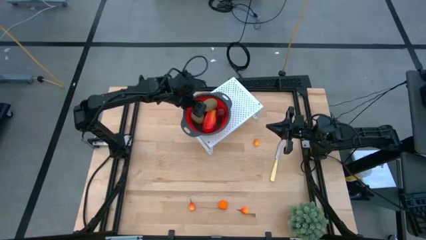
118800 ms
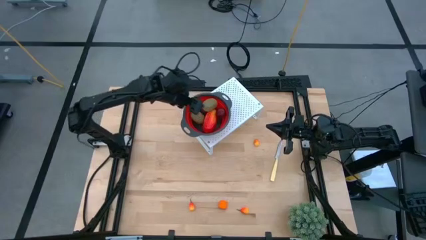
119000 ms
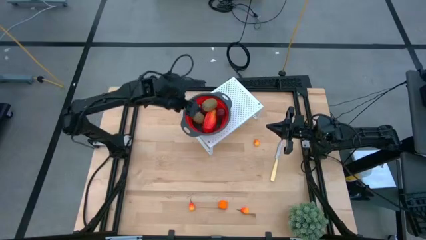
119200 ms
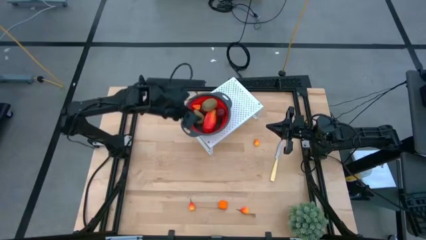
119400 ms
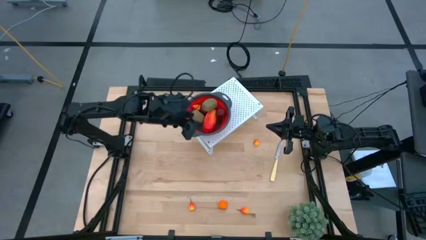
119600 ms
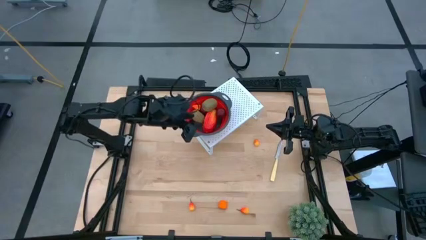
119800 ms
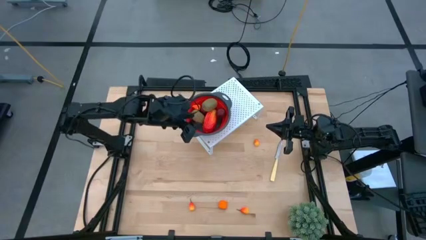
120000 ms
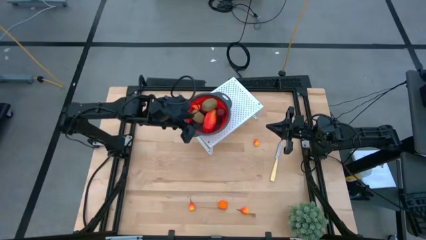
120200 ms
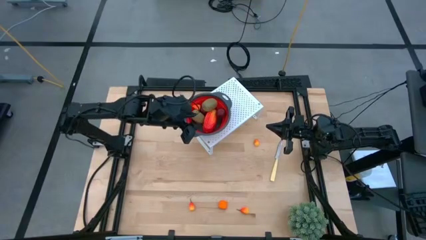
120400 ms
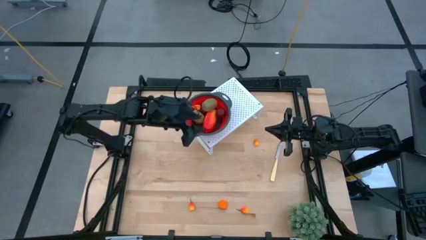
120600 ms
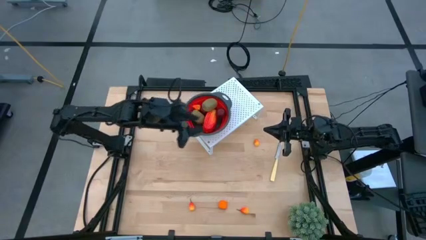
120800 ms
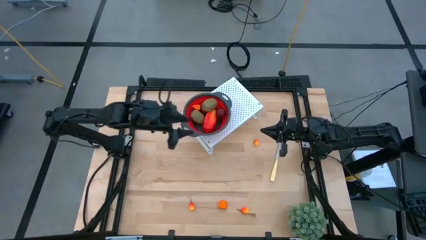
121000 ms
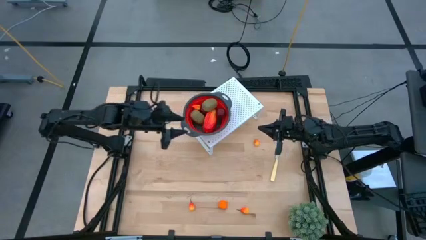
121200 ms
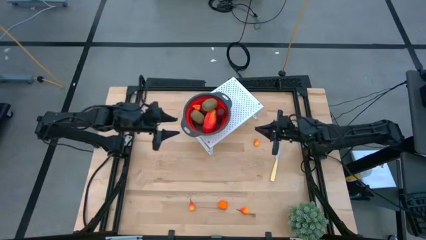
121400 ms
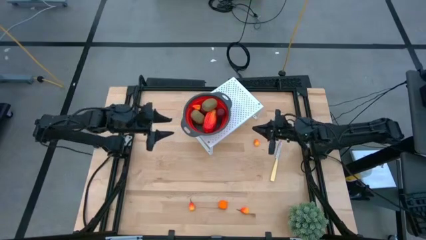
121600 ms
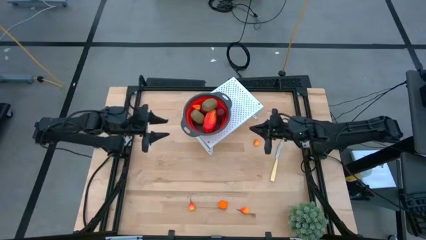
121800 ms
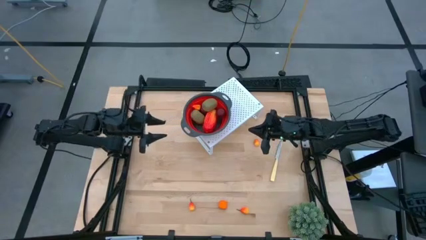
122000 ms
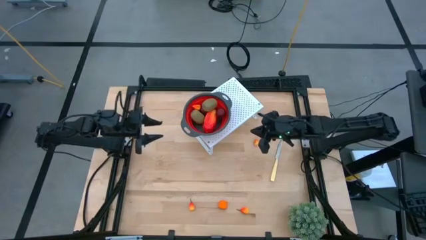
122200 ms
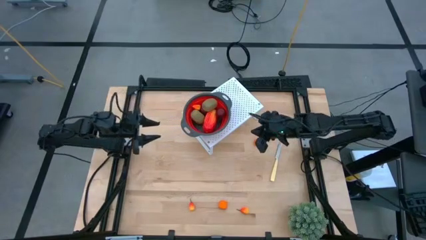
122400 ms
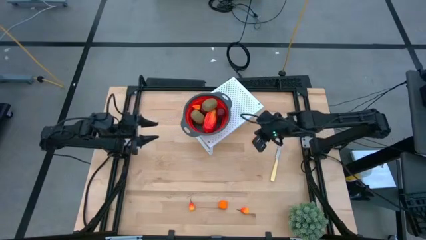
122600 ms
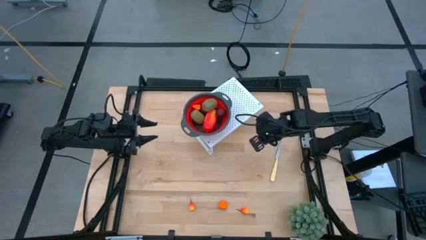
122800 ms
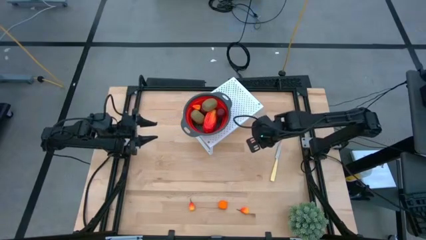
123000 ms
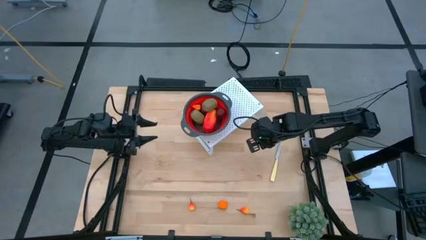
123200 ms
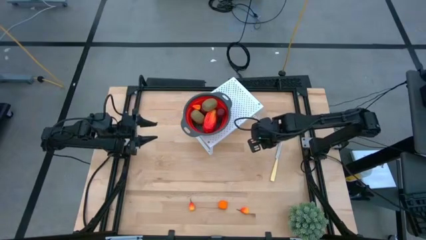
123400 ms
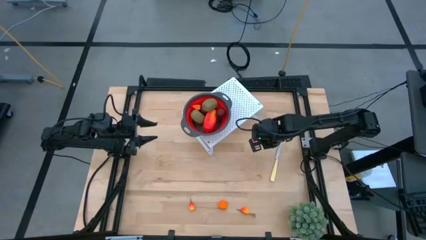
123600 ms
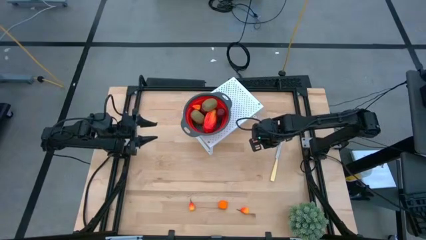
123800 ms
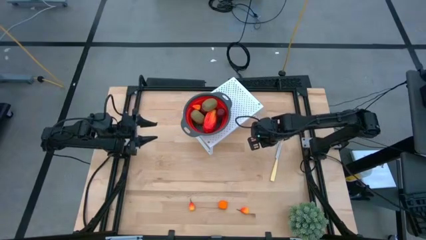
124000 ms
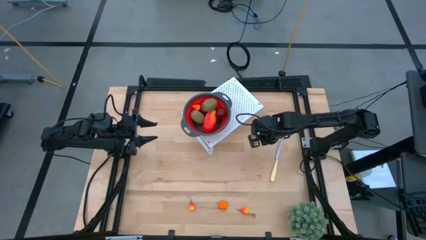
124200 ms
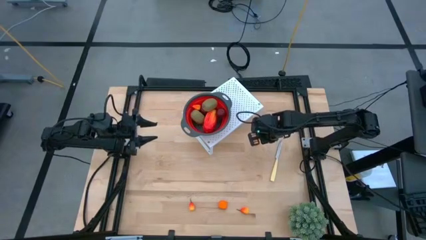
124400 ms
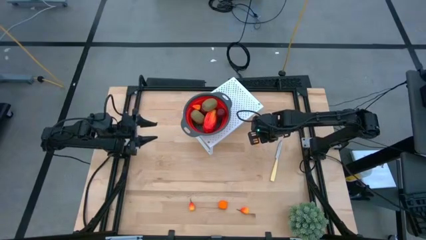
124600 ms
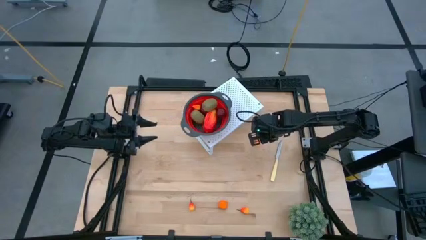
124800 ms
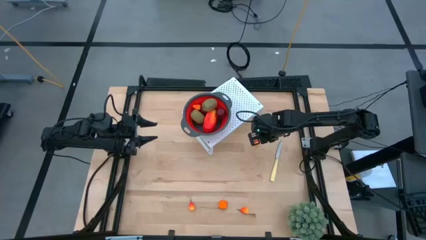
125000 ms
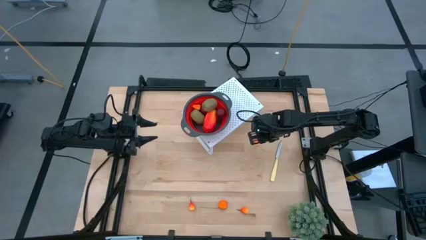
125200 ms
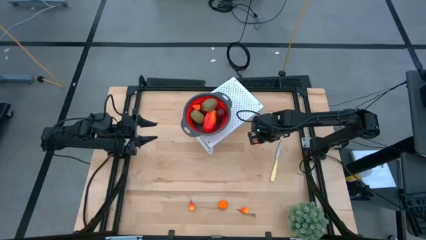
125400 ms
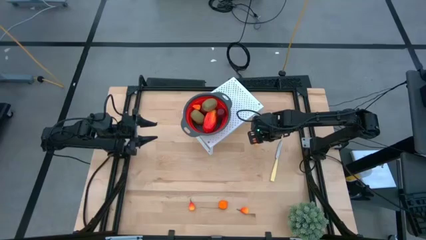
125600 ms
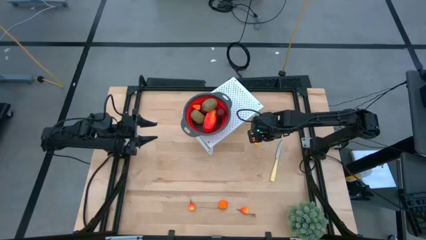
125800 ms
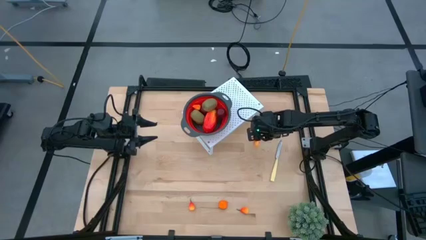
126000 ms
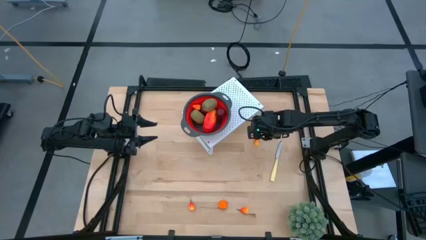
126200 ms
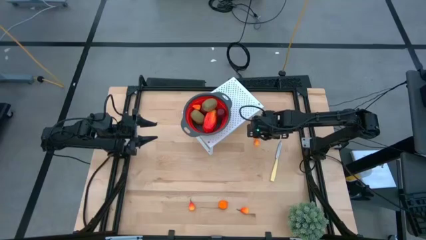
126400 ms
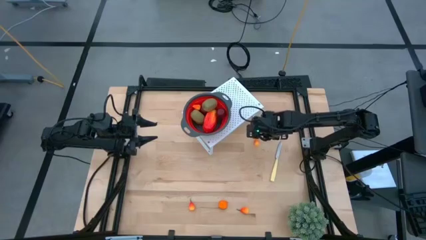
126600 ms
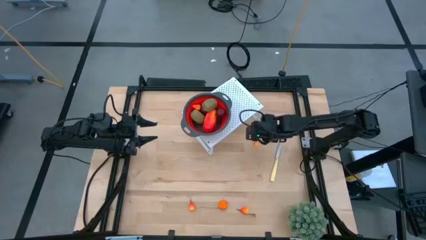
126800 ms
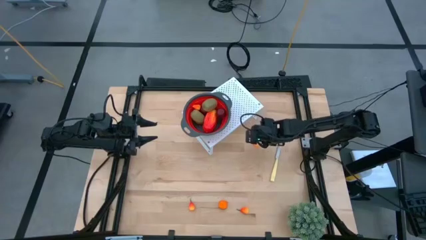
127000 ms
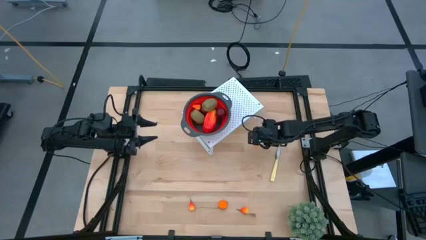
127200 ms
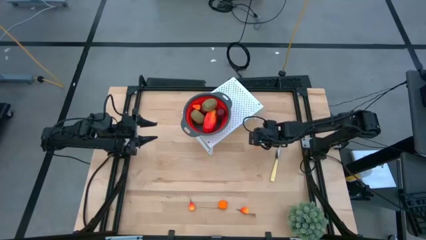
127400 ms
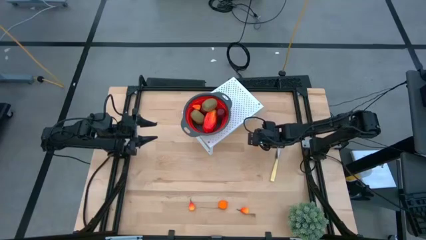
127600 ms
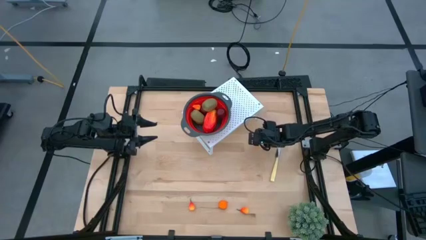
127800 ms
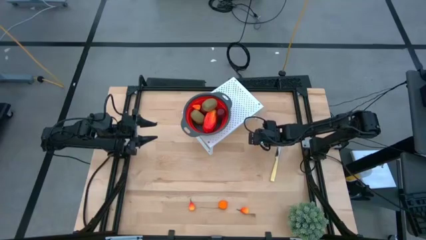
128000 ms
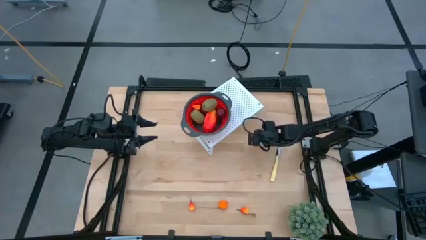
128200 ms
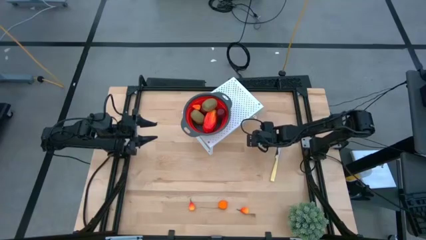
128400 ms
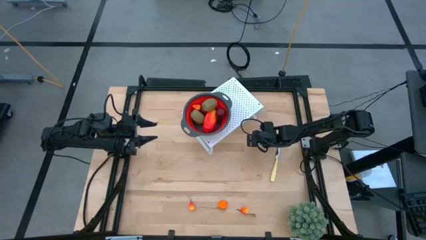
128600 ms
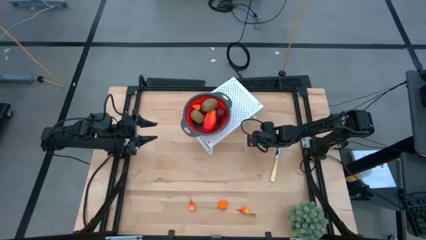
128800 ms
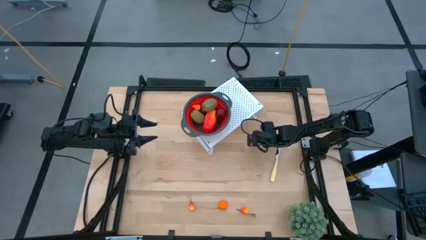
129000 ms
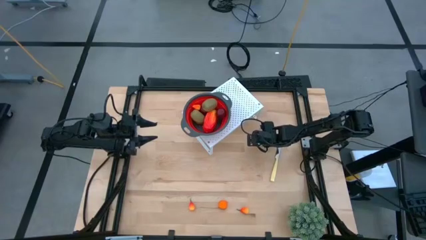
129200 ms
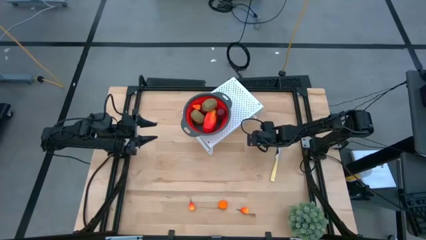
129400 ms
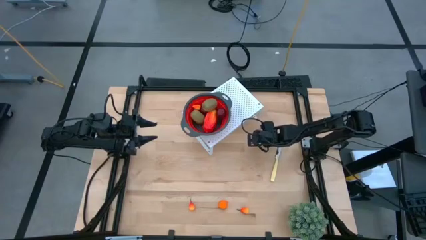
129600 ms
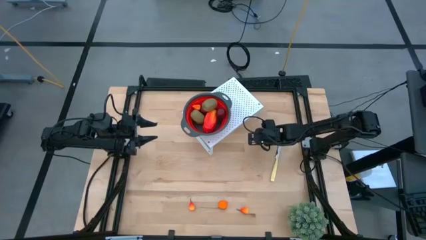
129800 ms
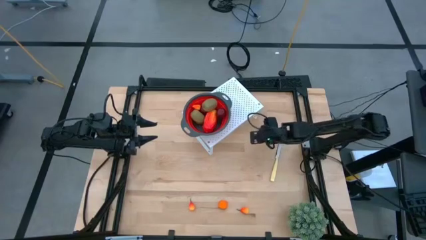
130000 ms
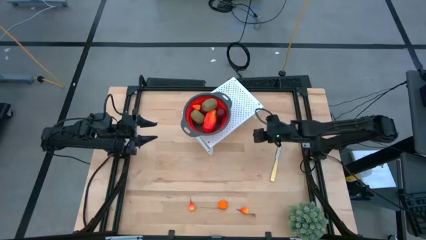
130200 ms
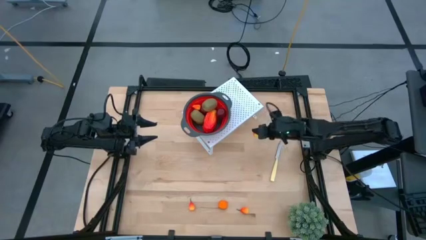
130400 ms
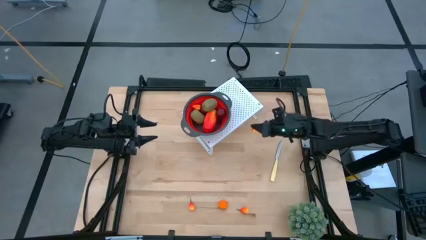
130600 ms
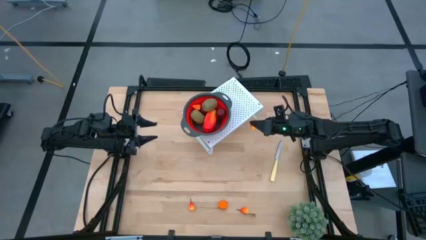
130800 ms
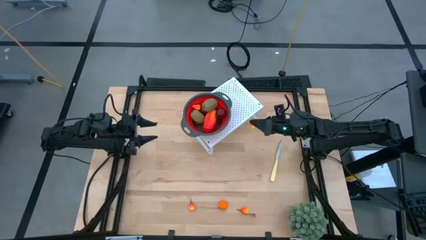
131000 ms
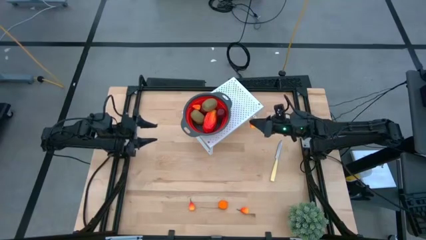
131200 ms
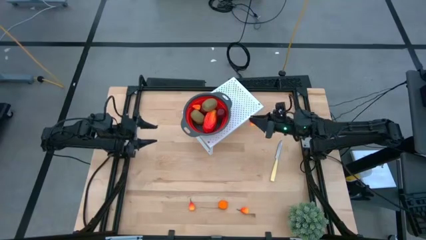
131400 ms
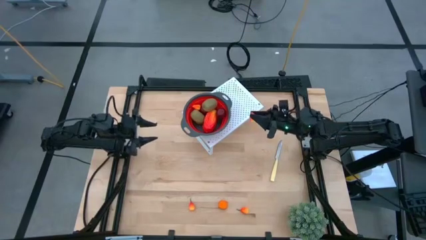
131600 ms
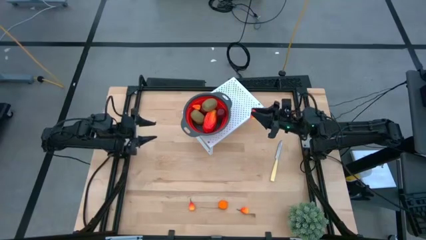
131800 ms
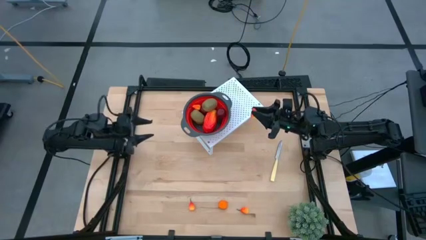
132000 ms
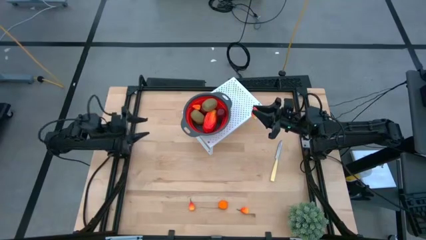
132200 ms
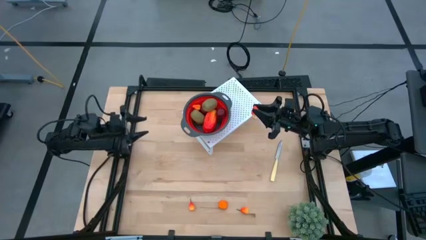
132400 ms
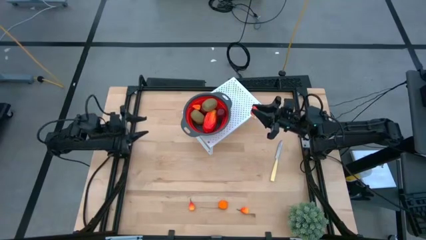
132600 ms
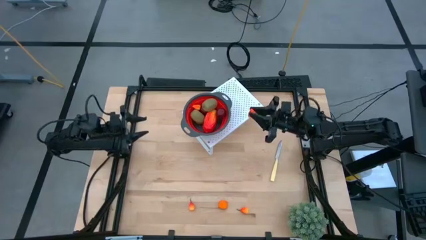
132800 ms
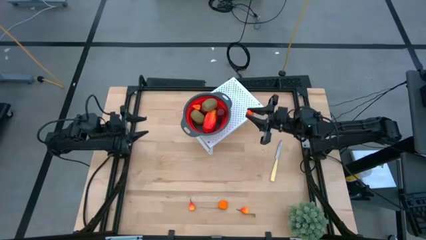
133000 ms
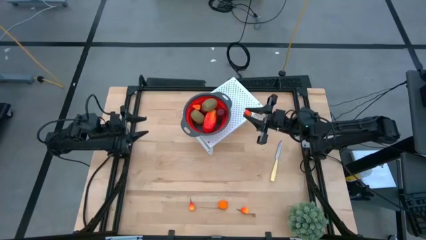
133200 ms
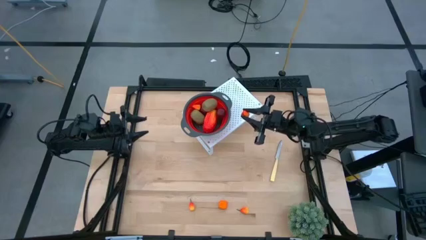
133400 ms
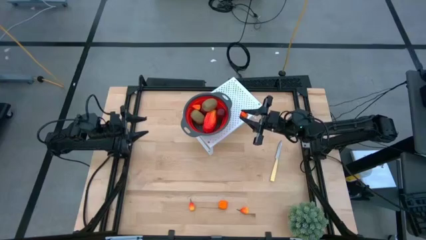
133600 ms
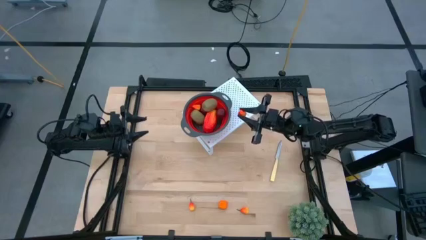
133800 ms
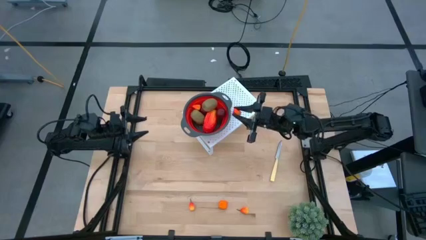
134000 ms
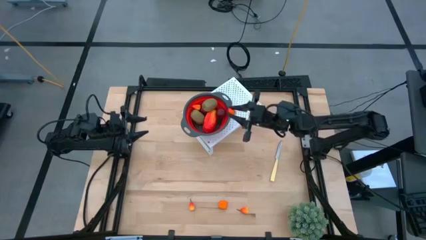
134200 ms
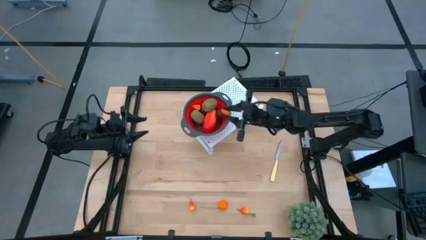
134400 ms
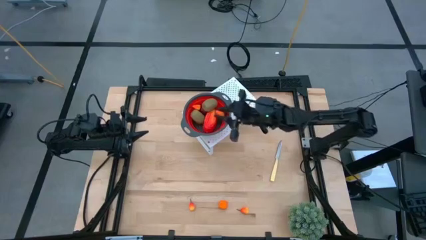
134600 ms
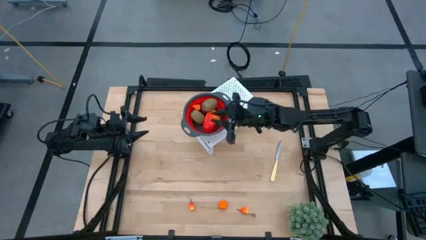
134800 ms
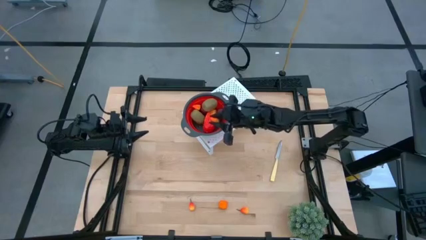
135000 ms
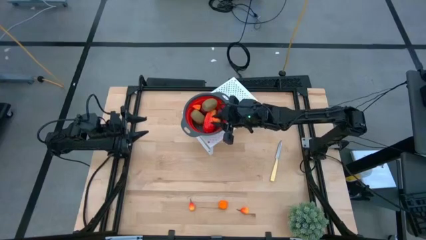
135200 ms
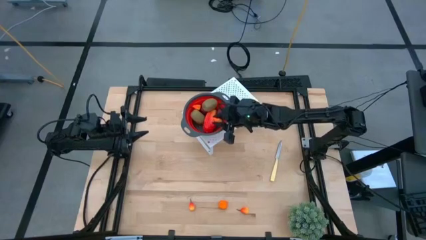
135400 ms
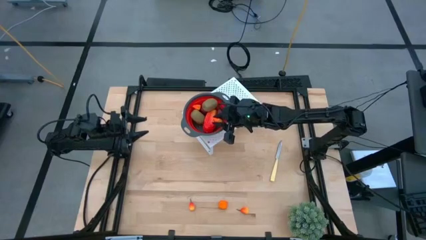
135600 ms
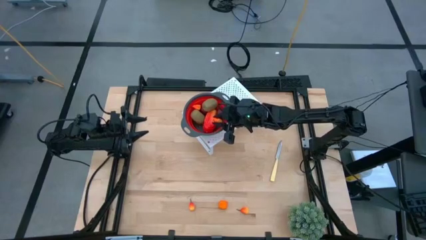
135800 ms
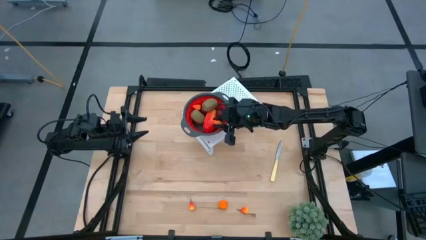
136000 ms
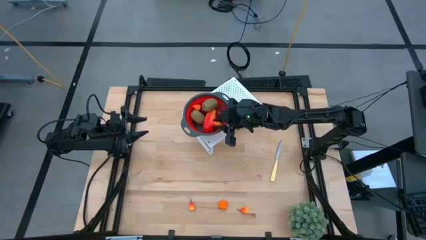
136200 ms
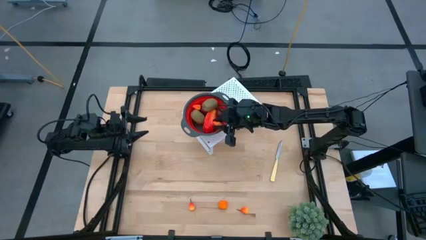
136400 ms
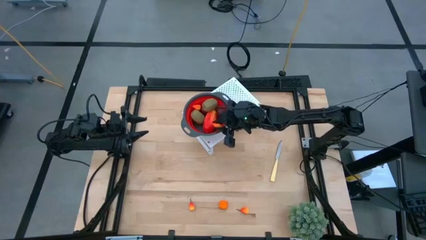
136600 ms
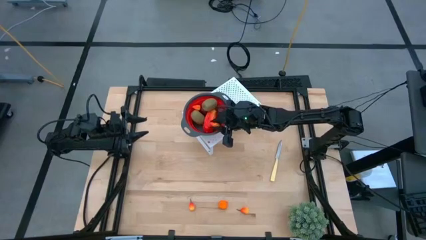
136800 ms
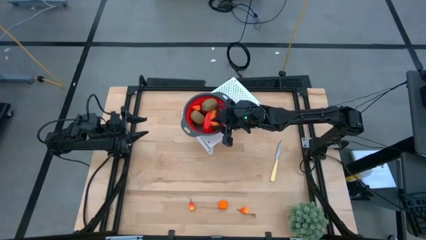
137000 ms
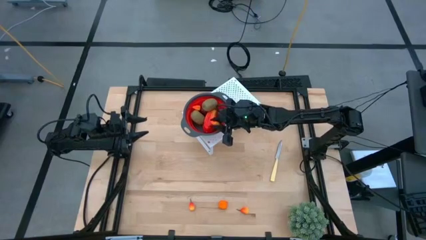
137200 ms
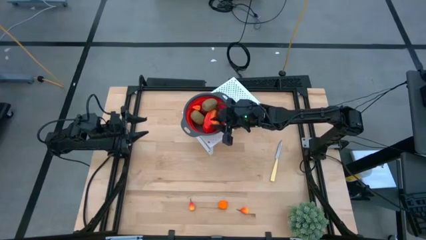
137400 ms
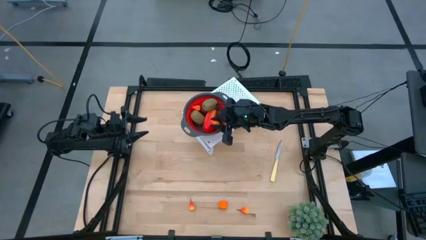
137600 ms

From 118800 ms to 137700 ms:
Task: Pick & Place Fruit
Put the top peach into the red strainer bowl on the shelf
